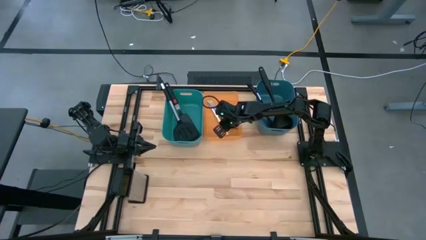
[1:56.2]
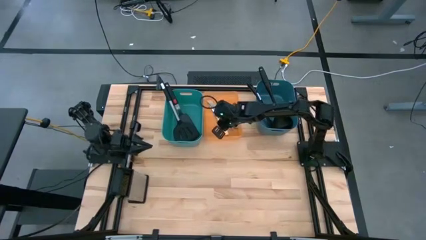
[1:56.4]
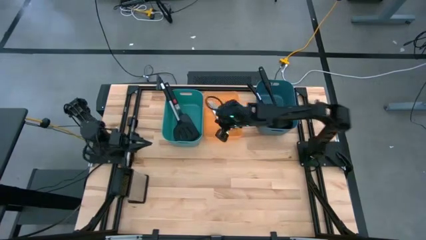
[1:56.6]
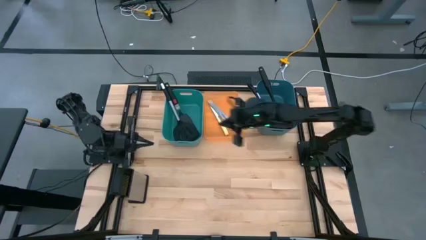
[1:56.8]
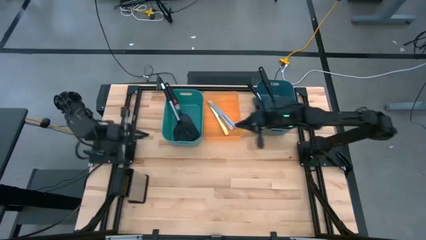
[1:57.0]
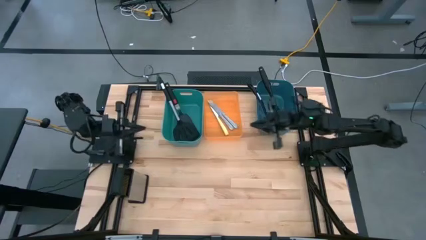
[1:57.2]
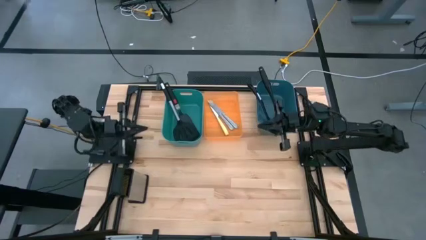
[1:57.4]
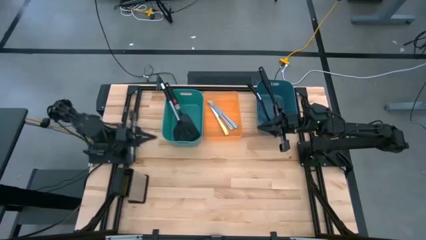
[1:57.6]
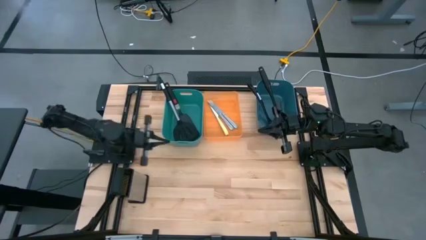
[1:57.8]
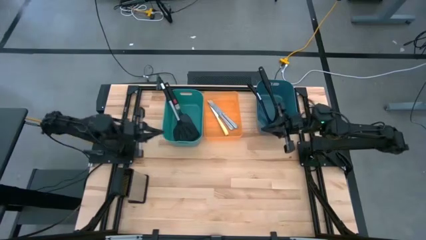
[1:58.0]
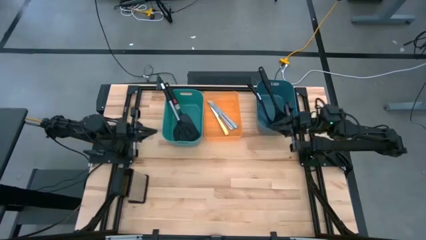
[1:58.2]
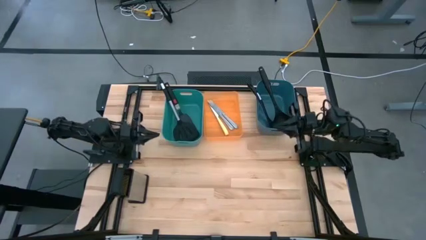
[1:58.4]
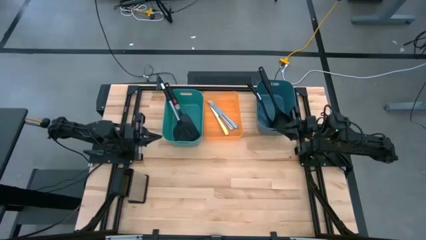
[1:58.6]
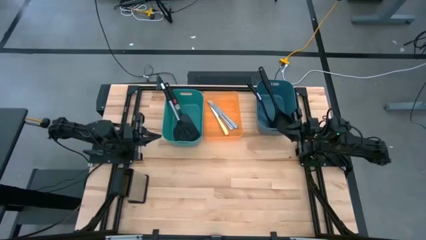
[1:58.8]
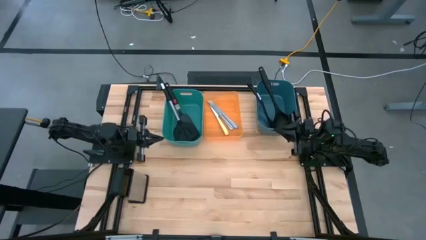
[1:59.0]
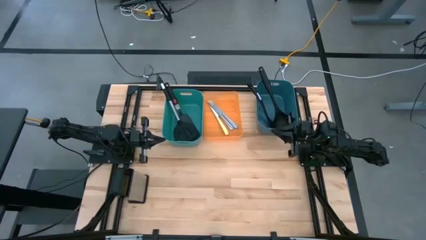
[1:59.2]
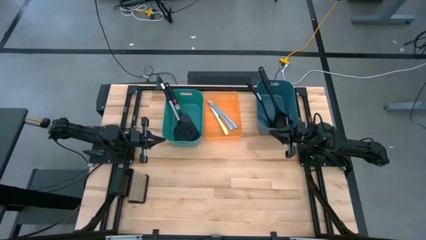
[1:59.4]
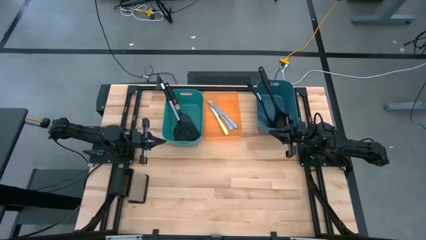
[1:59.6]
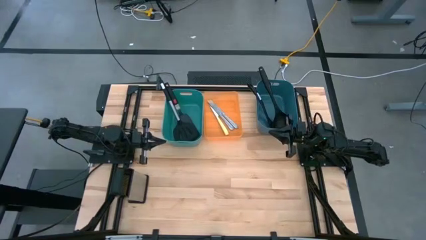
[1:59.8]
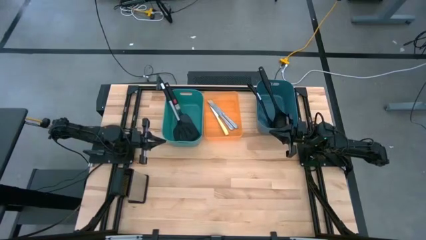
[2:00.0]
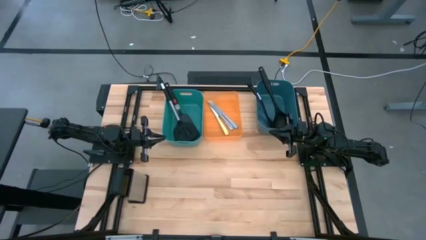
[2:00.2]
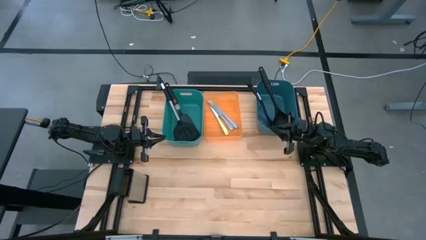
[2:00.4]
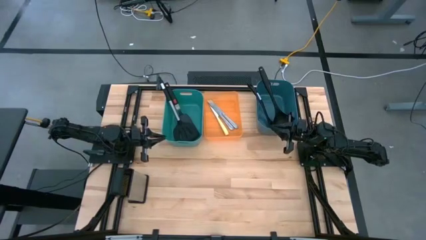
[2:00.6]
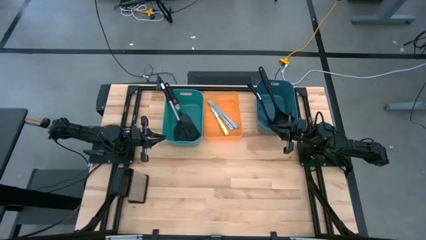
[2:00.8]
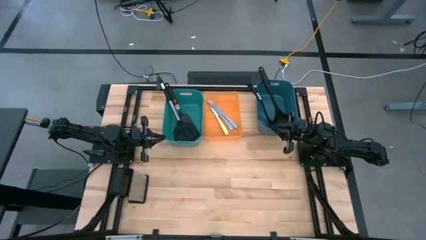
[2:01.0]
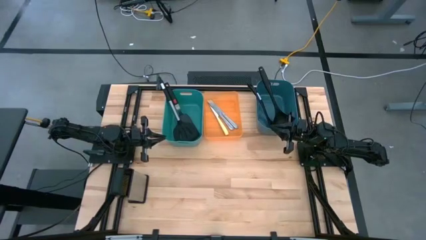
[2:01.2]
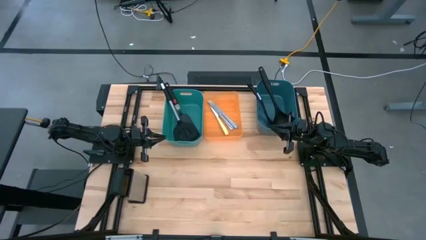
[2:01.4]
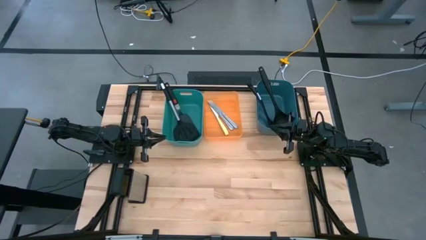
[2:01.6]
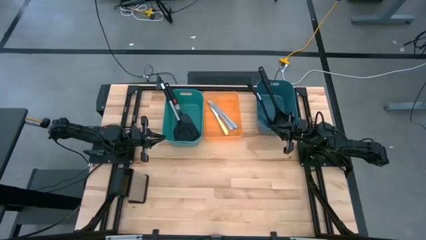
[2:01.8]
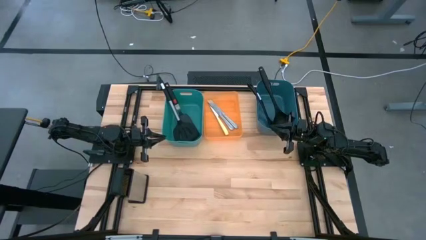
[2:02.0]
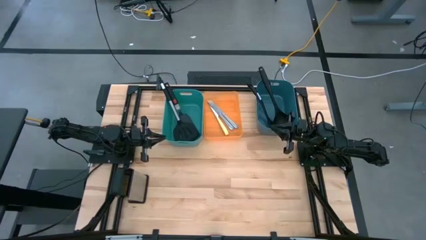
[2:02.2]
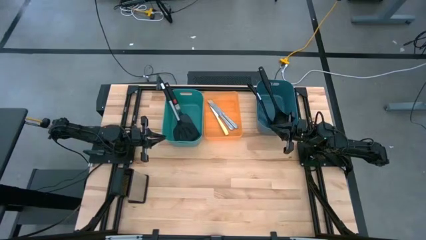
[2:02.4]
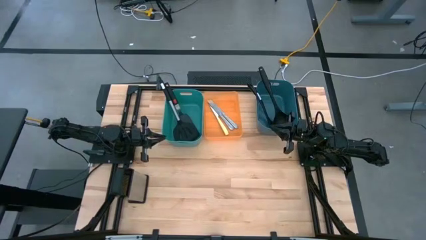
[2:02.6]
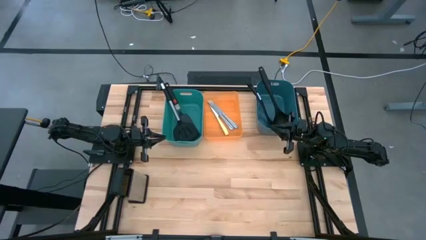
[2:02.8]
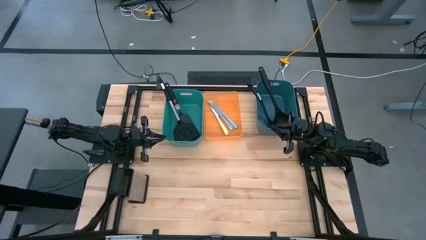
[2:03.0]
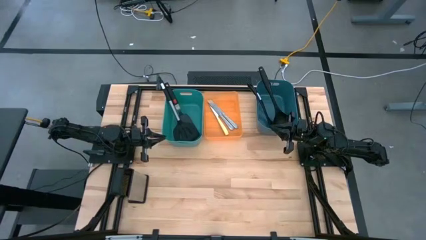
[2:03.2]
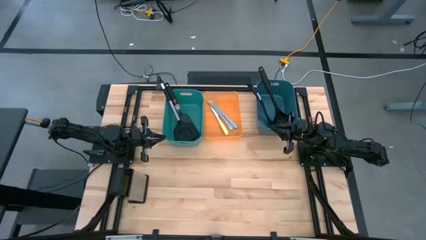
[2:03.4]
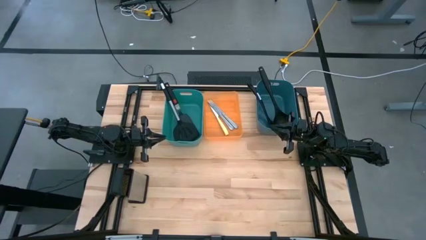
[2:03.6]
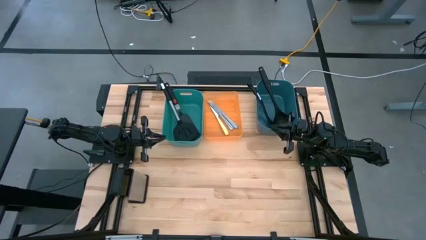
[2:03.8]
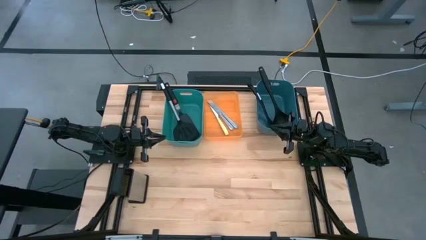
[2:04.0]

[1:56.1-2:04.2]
Task: Pick & Place Kitchen Items
Return to Home Position

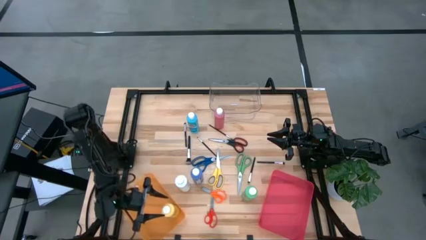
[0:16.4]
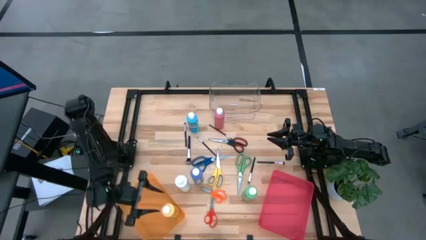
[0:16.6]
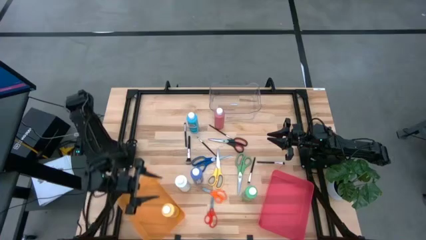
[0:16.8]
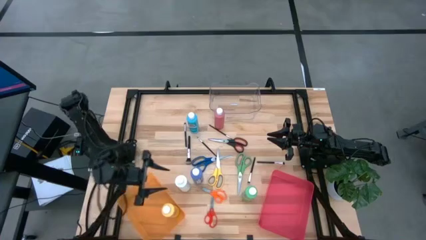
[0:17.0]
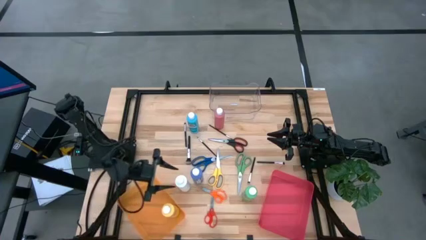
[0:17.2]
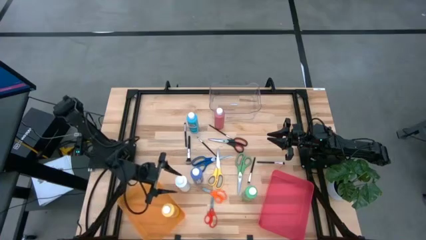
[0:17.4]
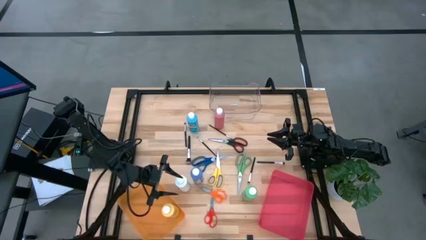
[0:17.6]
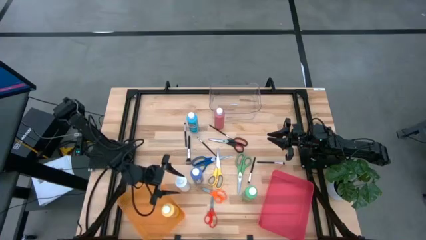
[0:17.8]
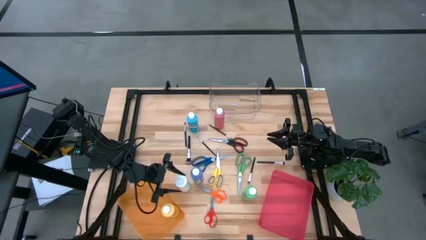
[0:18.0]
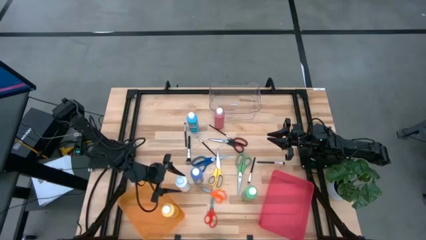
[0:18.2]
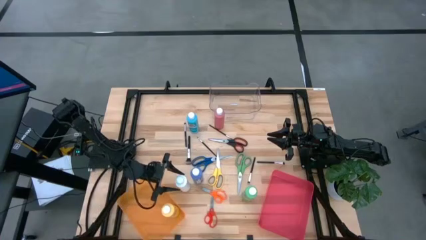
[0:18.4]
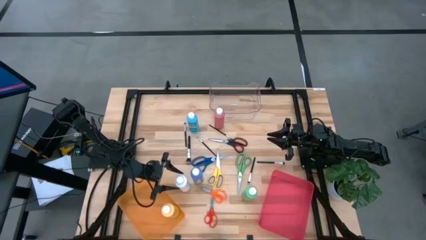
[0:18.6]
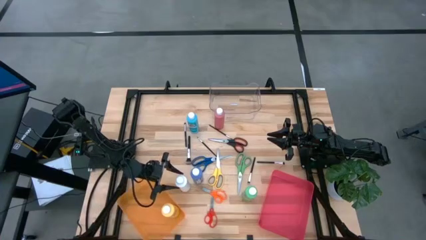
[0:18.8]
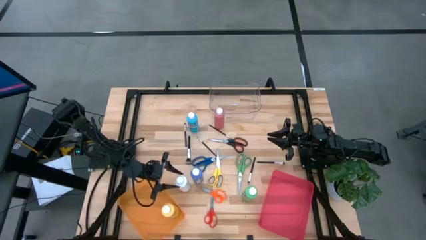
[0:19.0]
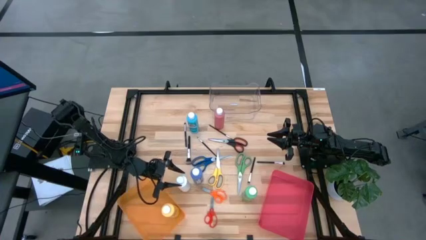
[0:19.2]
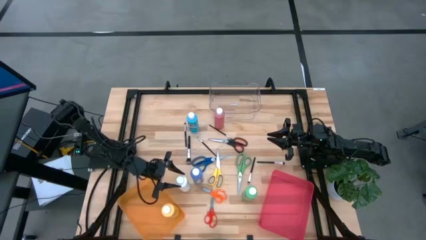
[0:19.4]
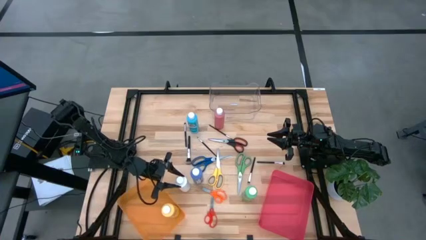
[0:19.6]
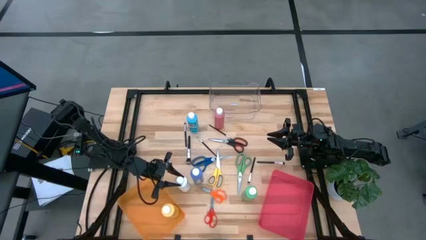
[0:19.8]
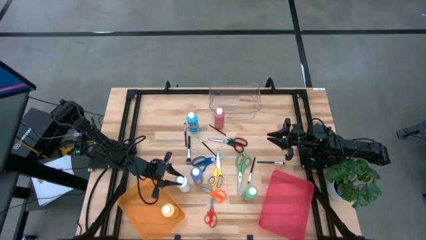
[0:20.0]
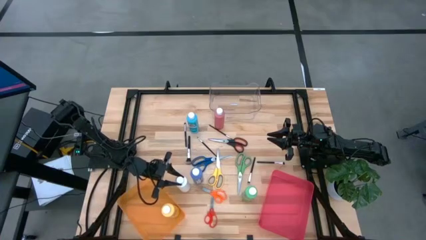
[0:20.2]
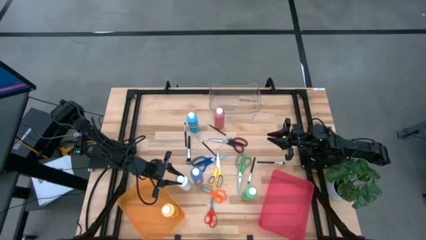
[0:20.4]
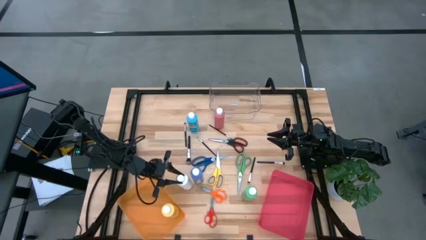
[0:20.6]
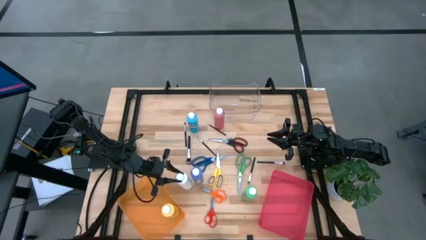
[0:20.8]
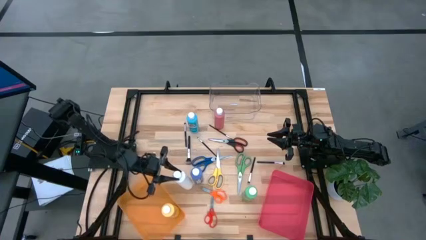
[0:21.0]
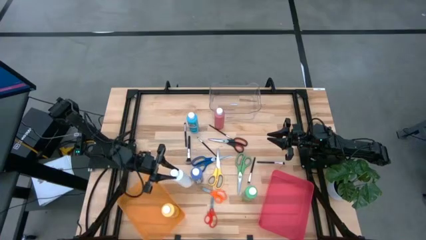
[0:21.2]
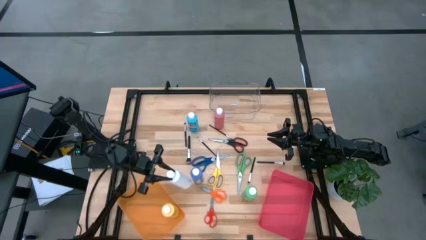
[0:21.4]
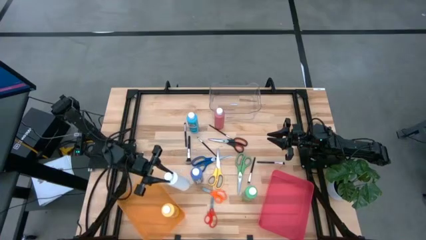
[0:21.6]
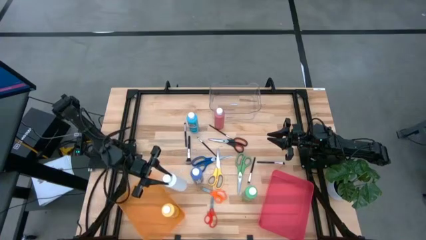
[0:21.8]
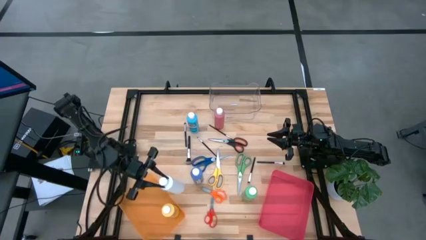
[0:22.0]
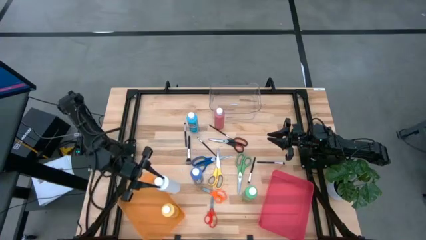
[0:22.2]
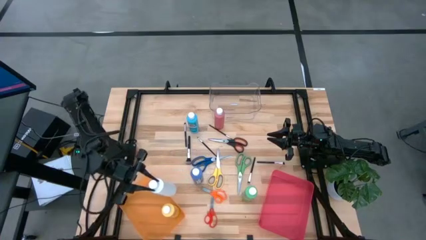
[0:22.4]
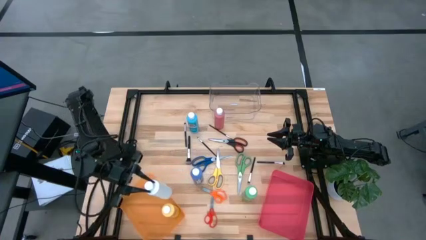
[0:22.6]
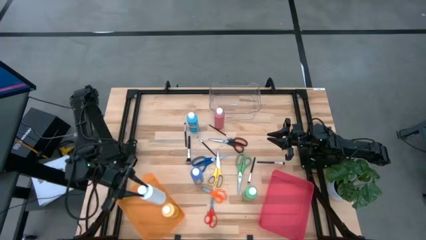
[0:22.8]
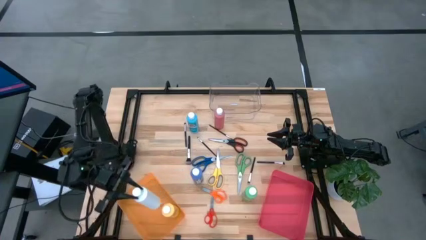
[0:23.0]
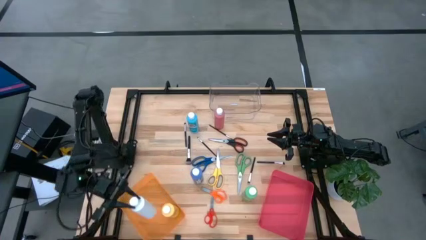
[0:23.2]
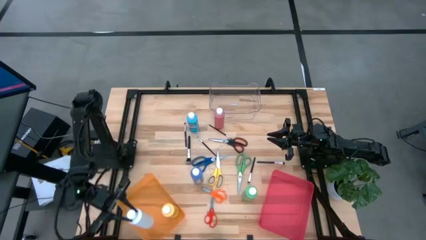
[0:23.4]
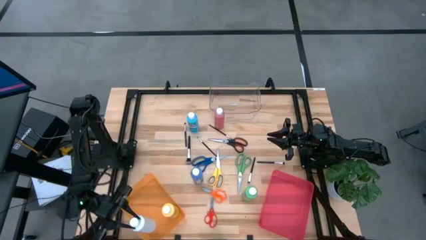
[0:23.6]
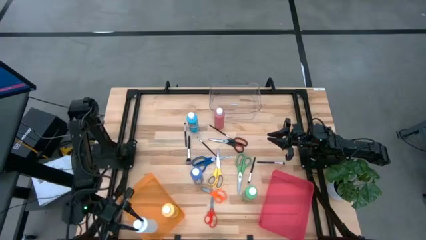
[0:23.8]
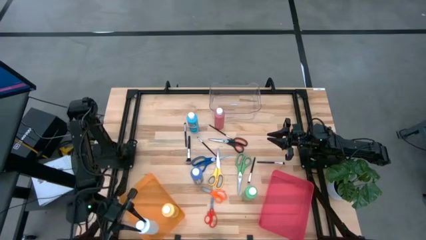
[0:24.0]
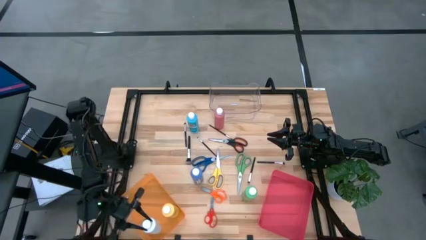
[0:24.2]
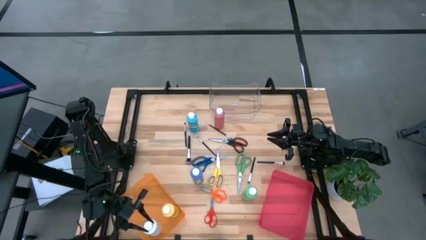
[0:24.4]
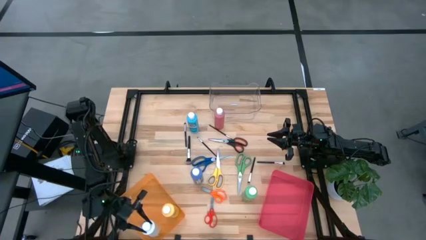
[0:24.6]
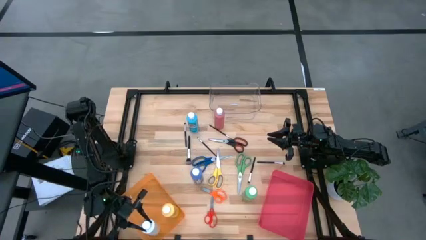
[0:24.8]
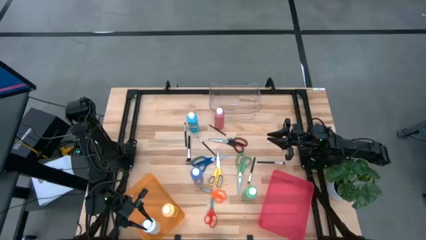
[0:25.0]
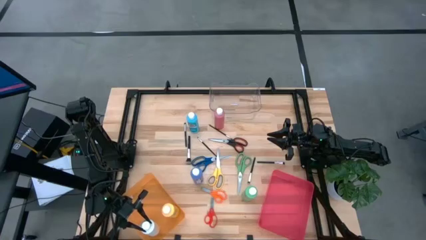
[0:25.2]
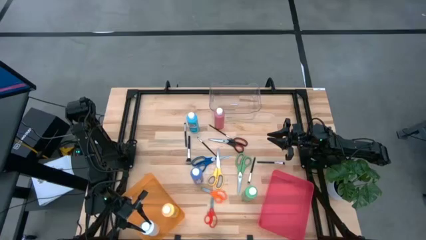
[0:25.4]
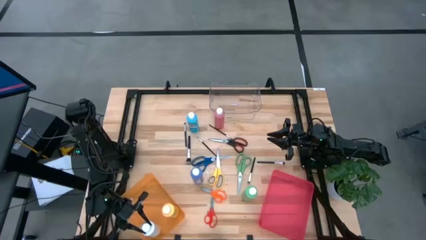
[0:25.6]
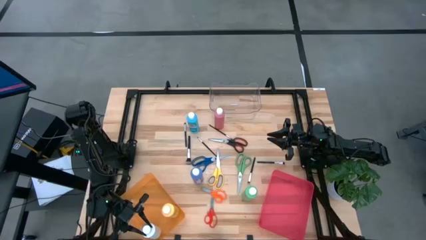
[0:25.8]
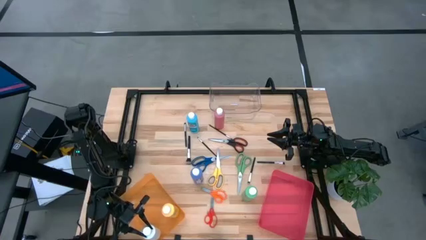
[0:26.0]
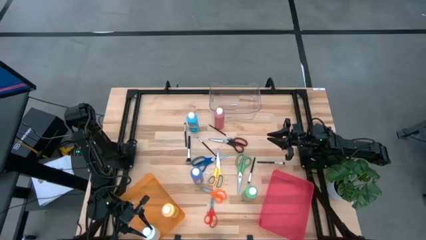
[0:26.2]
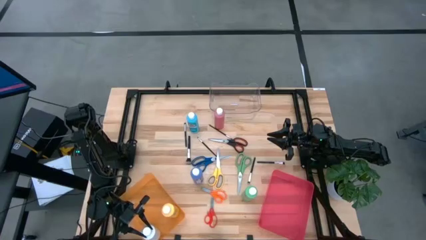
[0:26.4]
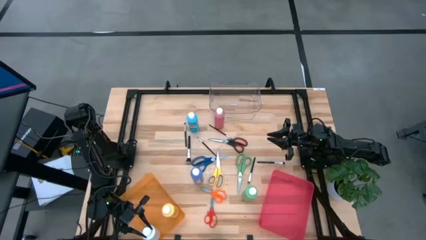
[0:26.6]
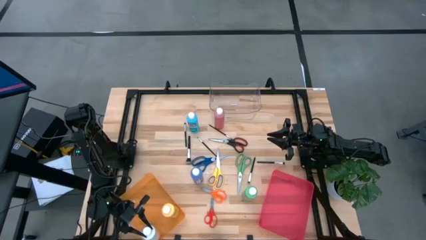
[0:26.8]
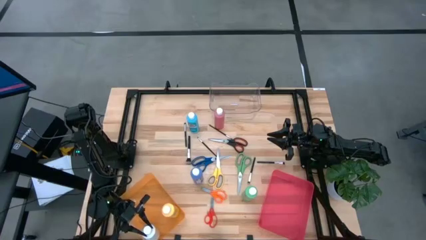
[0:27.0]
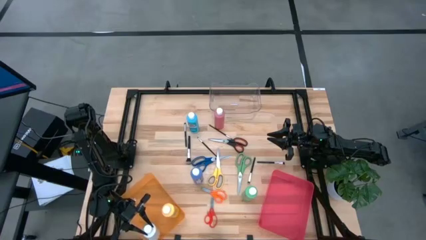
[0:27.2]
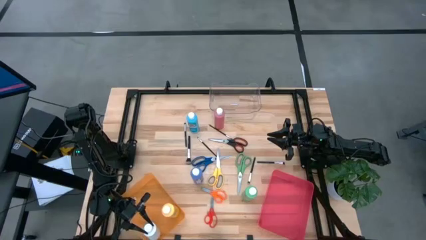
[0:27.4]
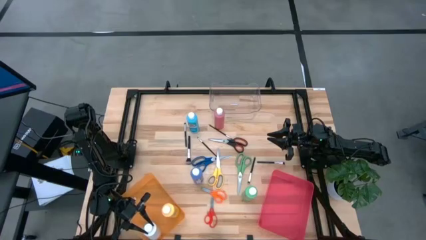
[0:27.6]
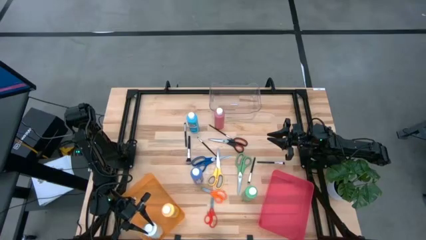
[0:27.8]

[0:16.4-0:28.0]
Task: Pick & Place Paint Supplies
Put the white paint bottle into the orange bin
